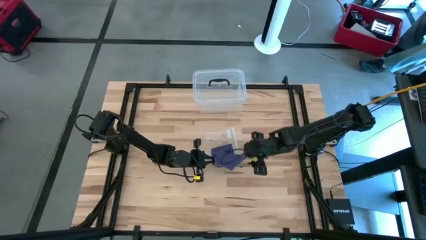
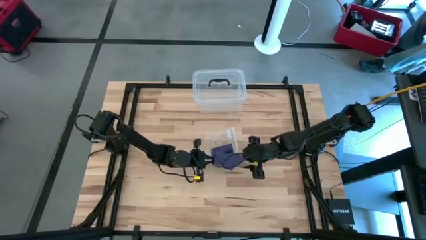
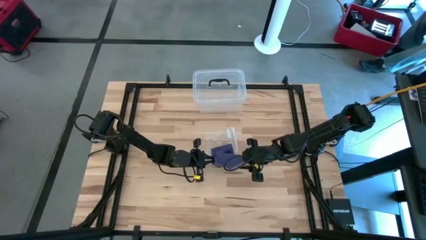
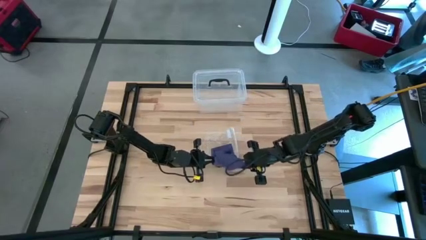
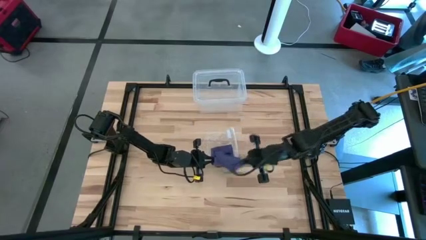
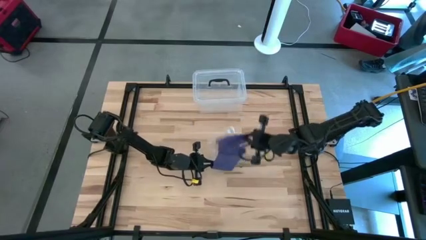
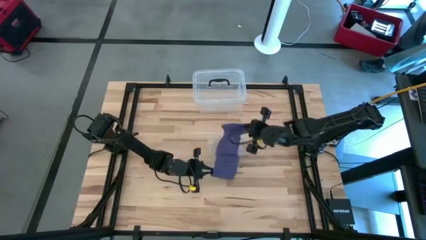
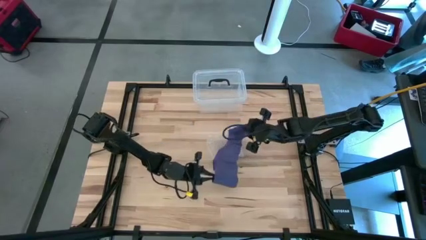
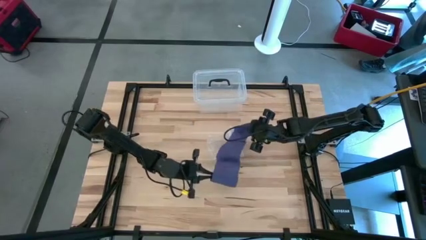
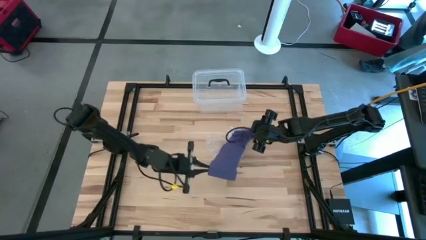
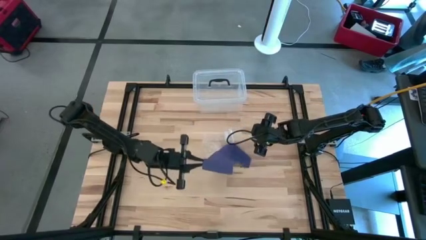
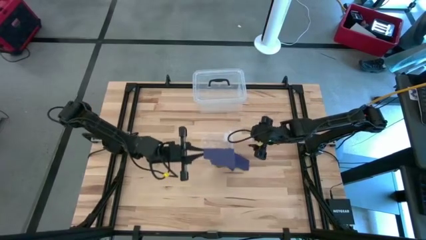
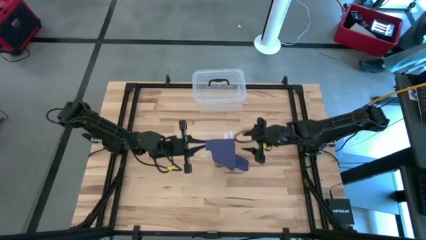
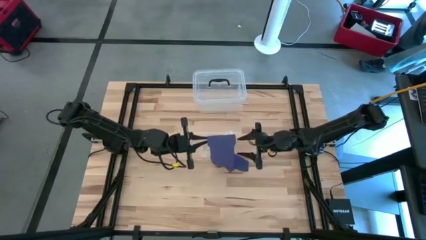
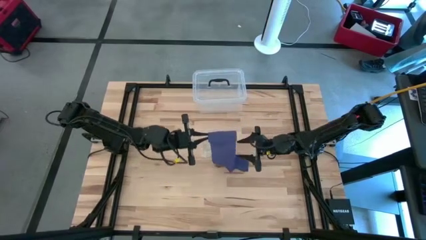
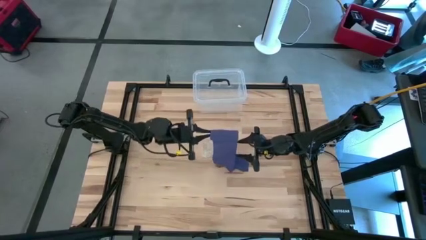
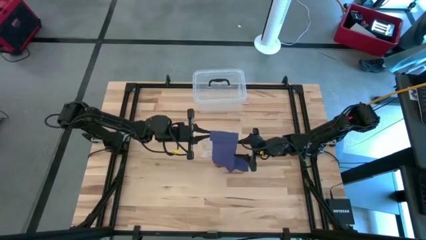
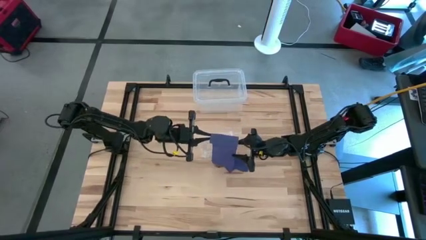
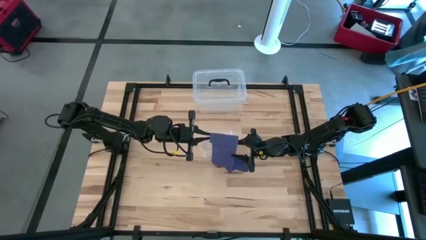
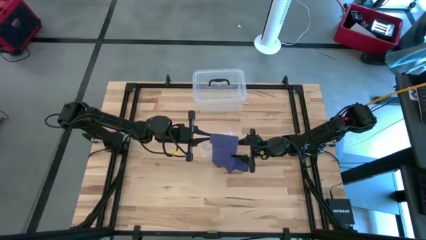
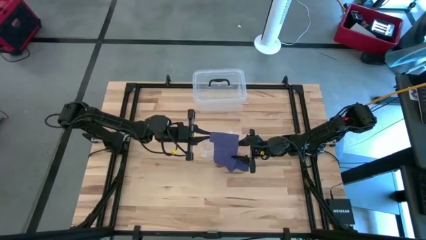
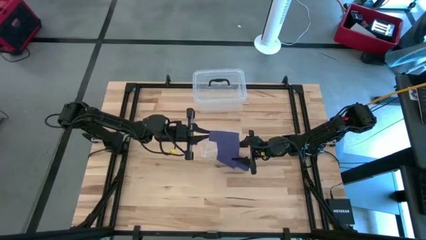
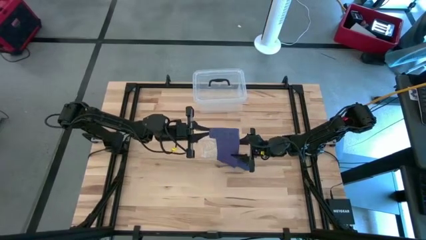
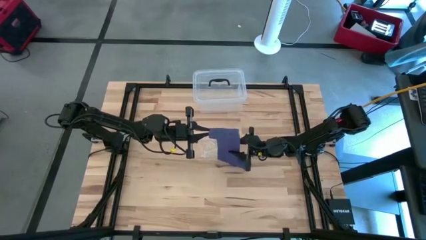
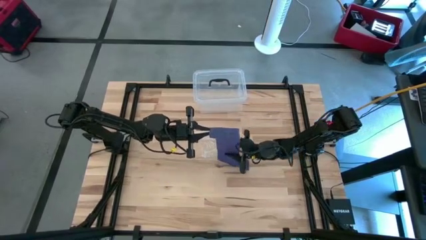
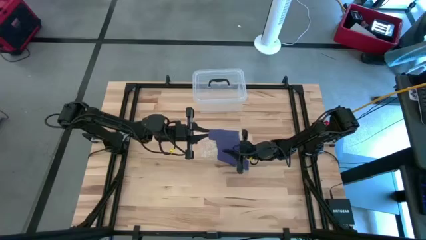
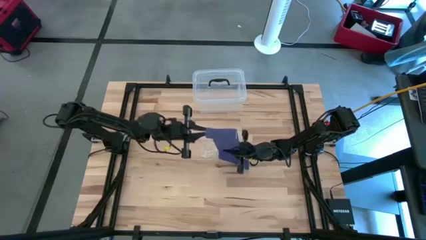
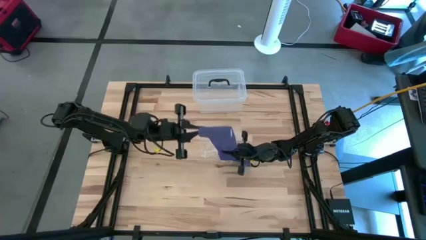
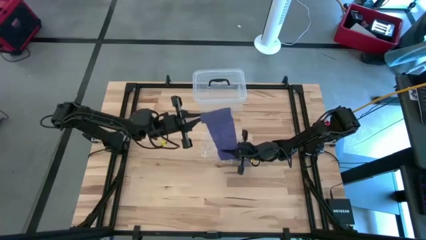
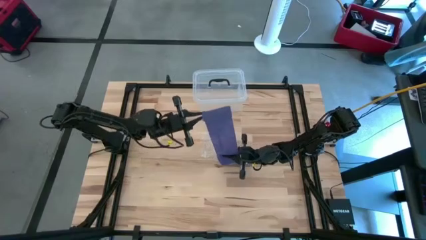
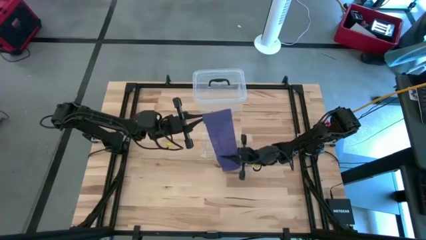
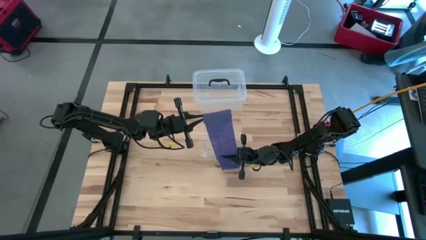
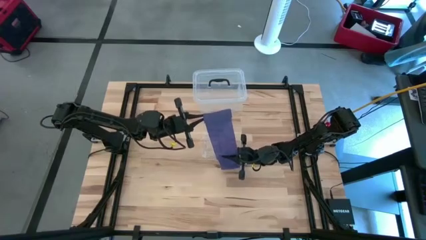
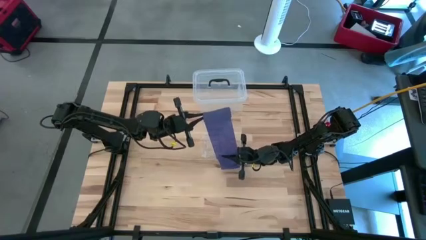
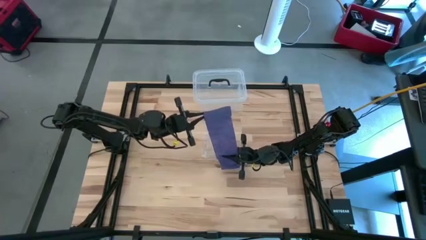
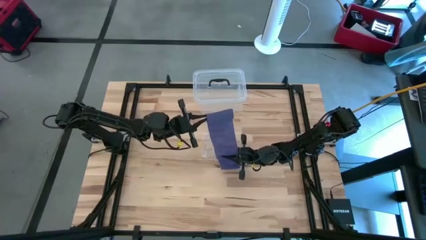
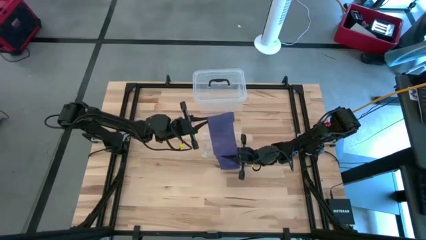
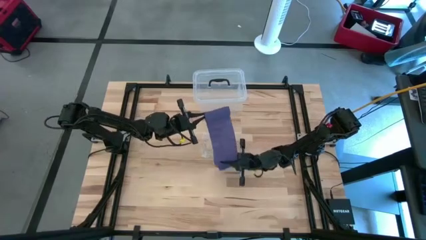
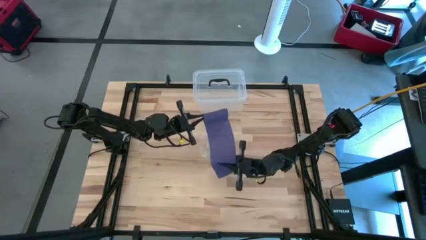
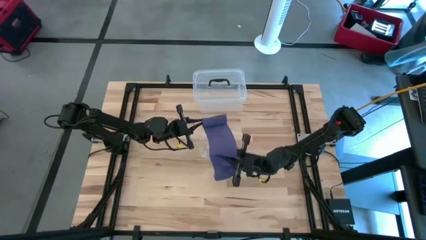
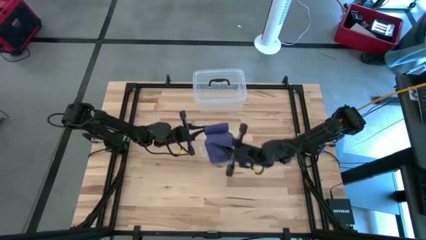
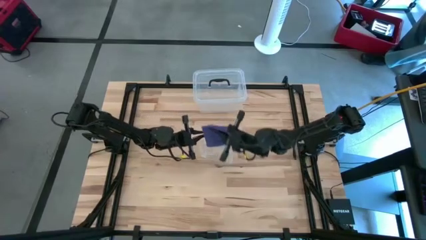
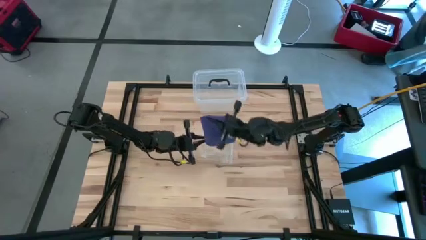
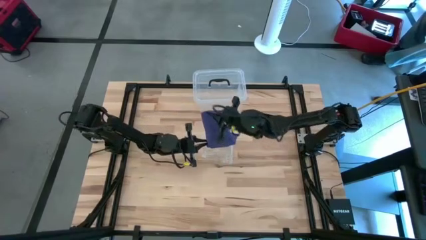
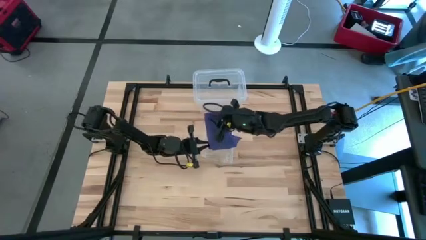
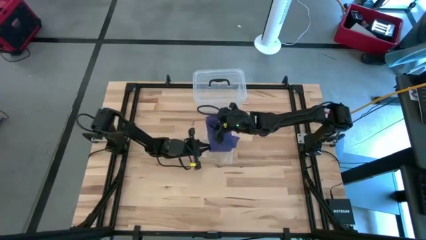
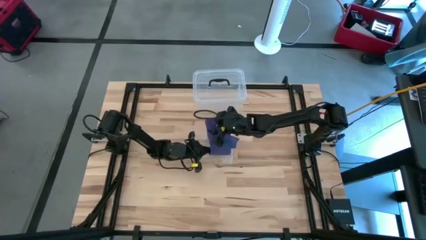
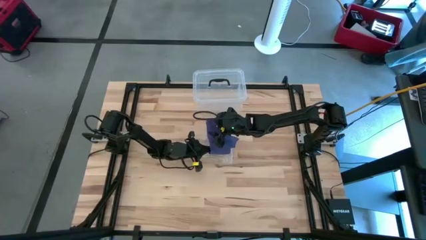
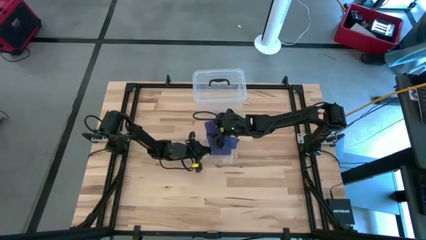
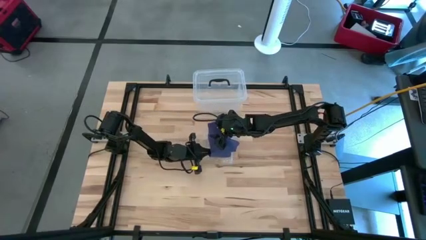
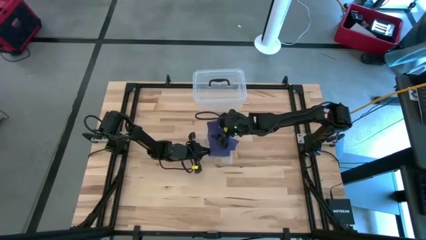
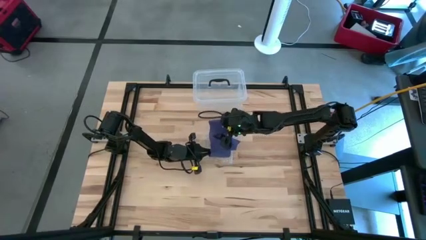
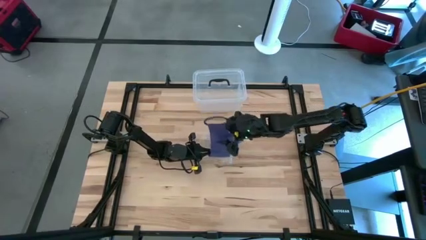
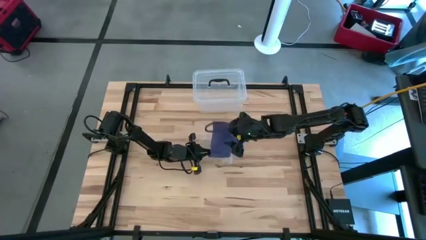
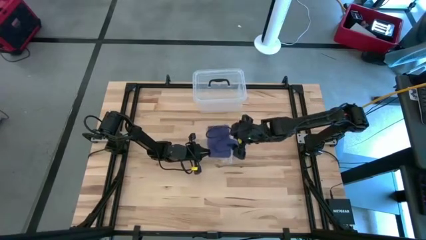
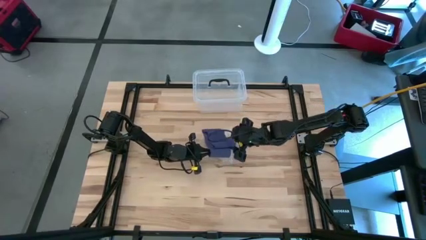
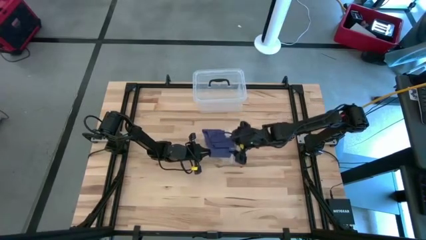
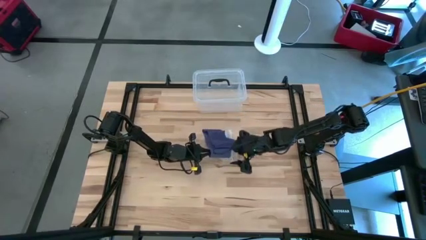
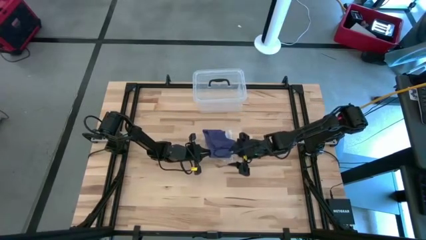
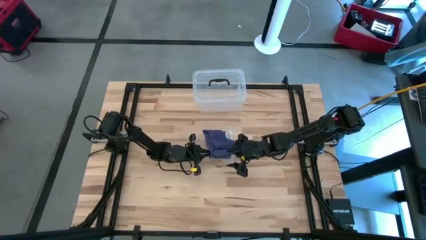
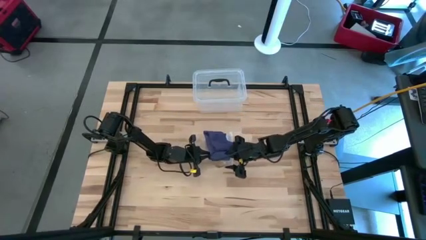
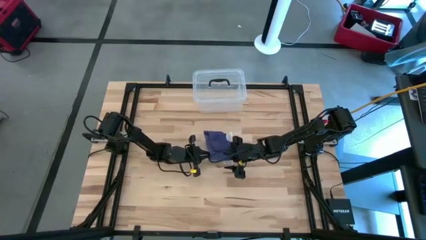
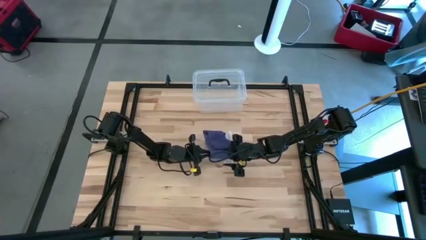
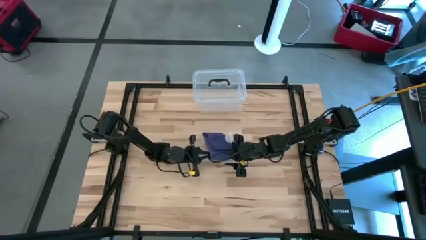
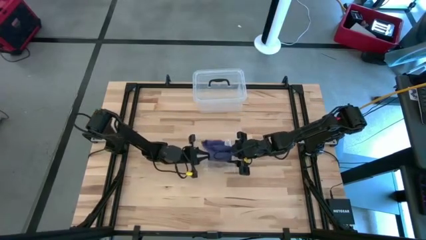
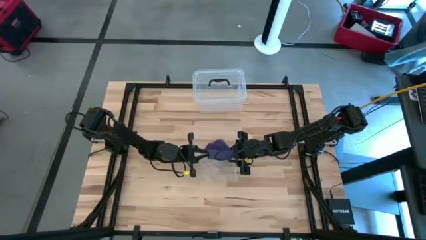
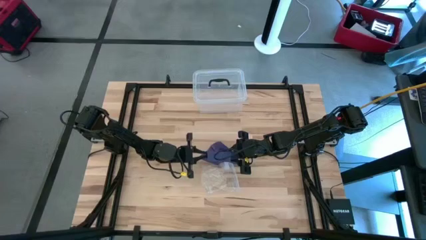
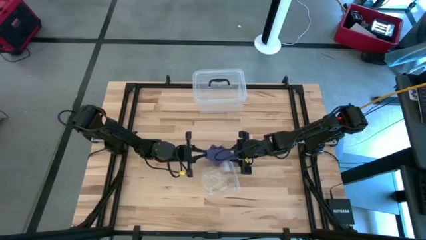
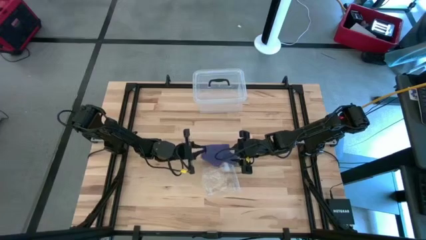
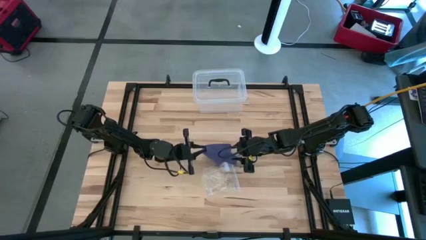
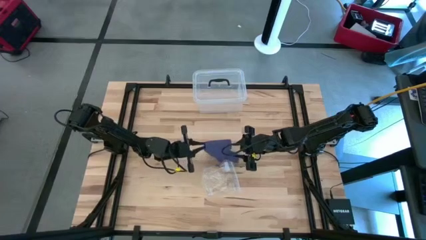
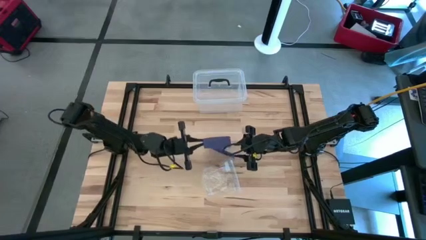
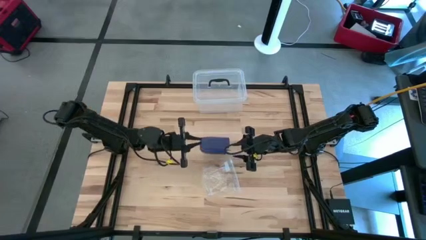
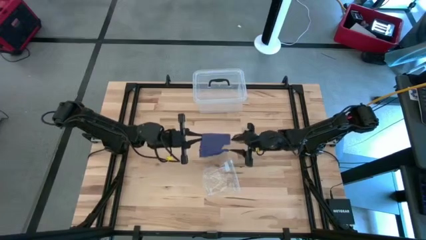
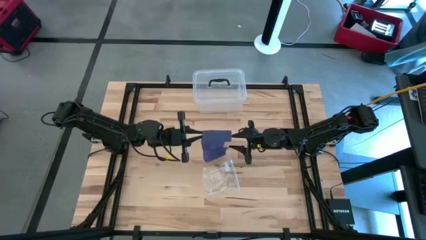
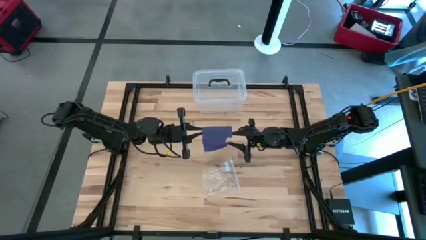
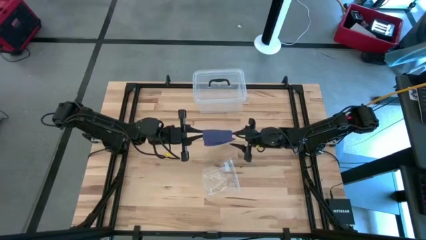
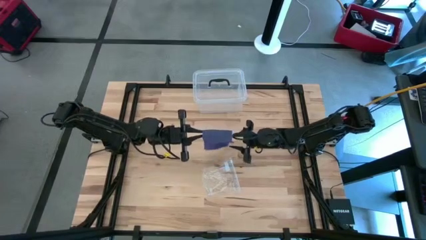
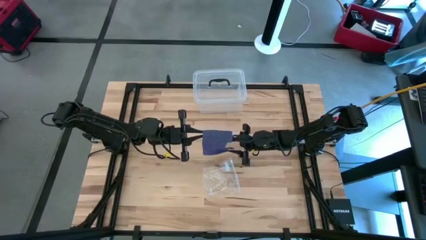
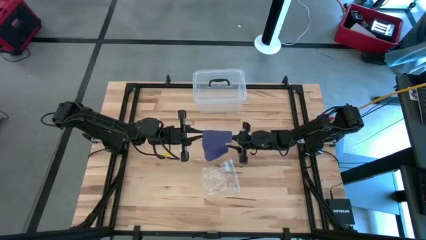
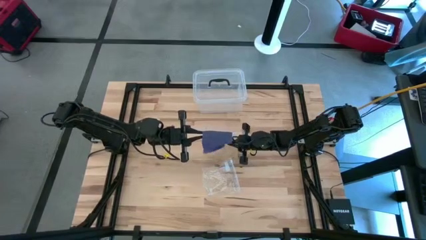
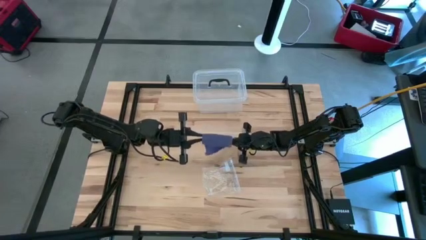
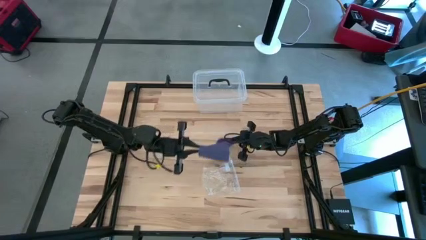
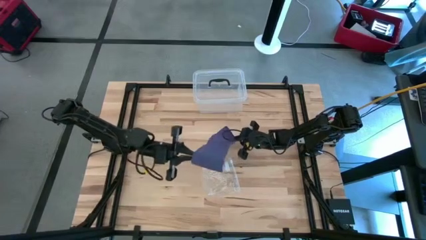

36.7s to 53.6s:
Task: Roll bandage
Roll the violet bandage
